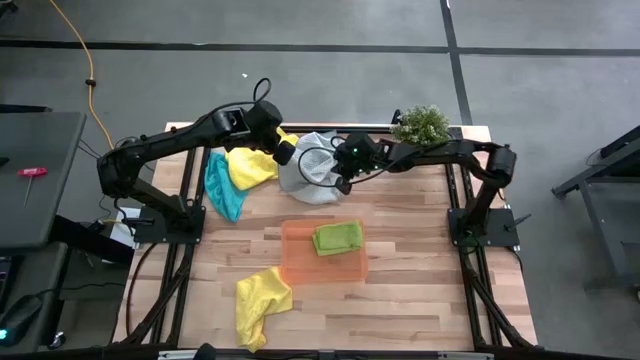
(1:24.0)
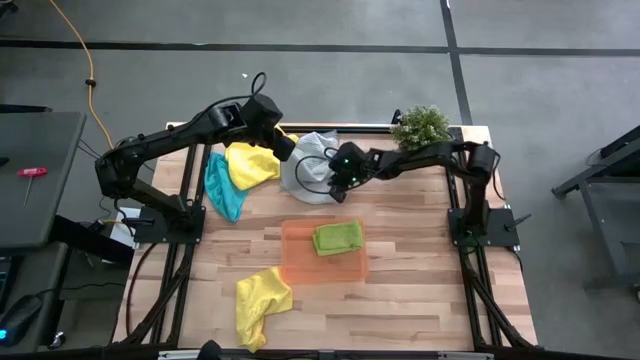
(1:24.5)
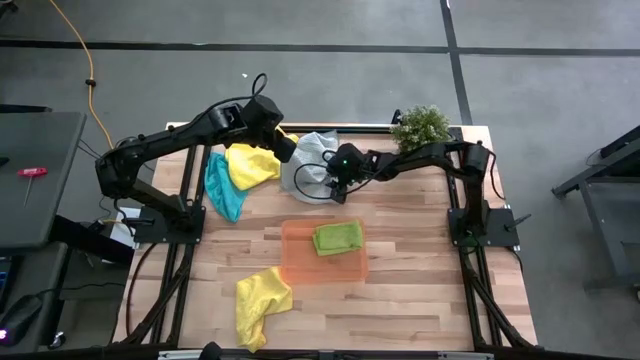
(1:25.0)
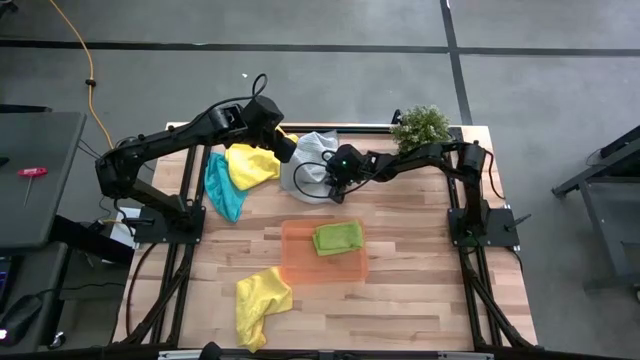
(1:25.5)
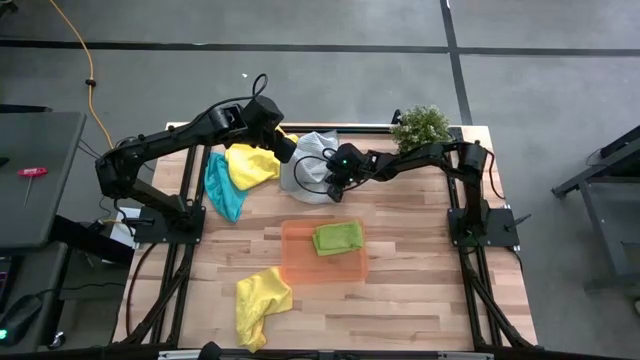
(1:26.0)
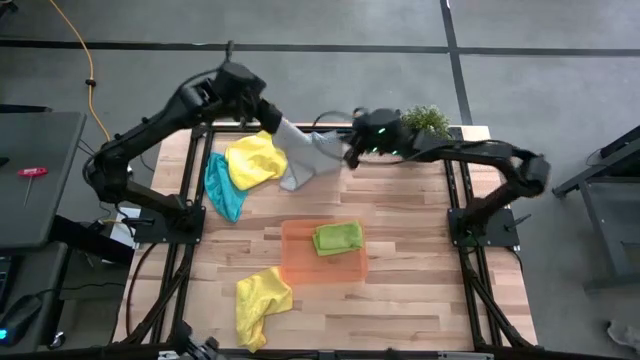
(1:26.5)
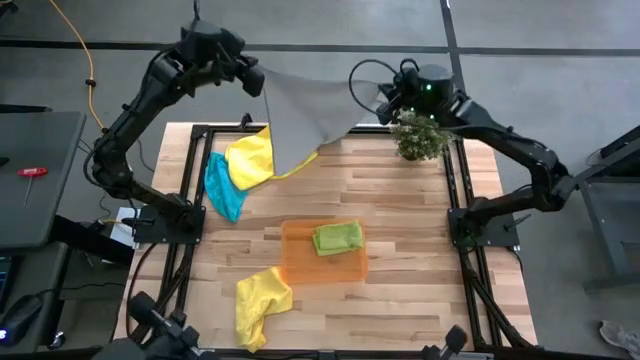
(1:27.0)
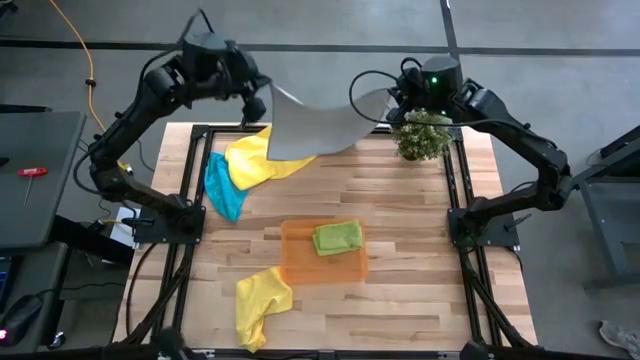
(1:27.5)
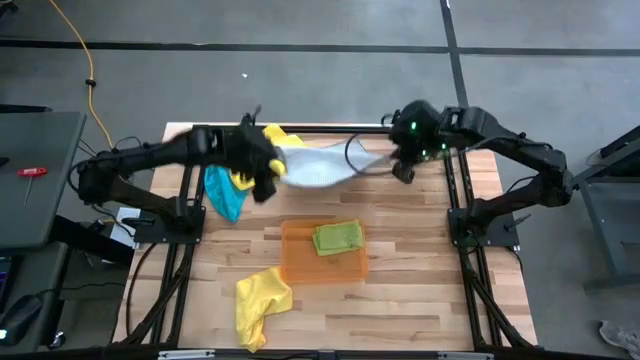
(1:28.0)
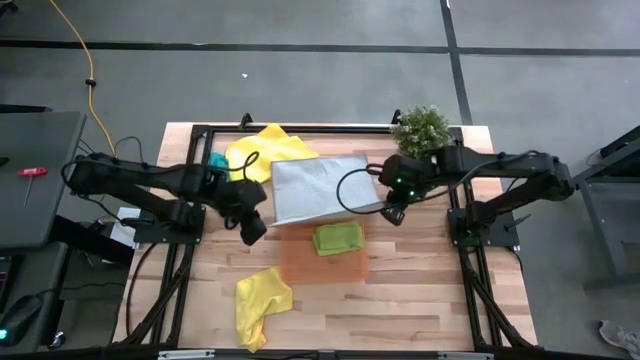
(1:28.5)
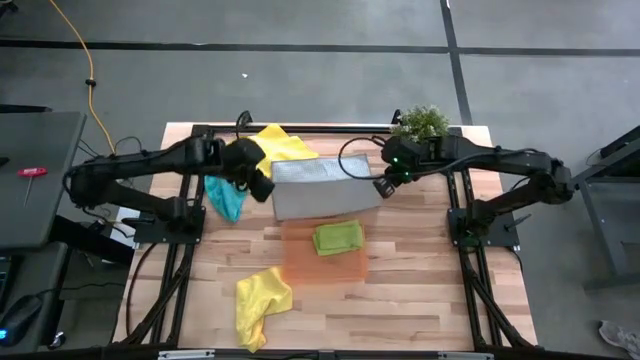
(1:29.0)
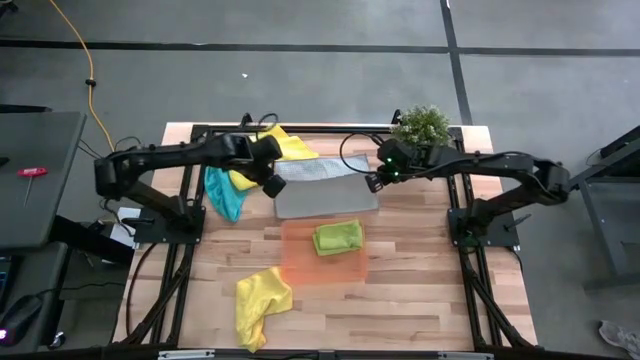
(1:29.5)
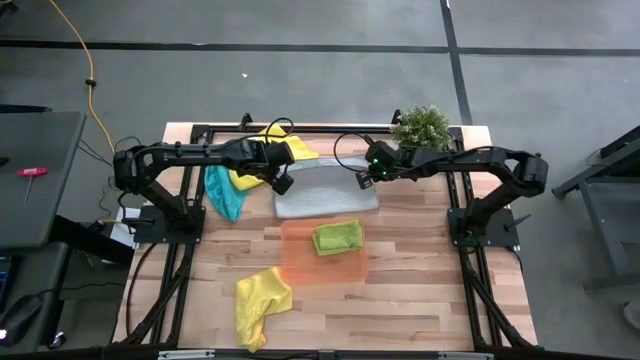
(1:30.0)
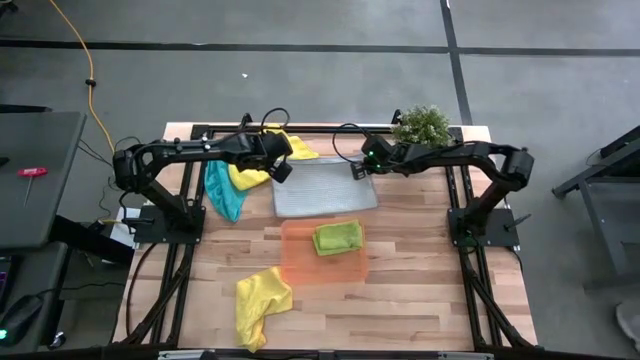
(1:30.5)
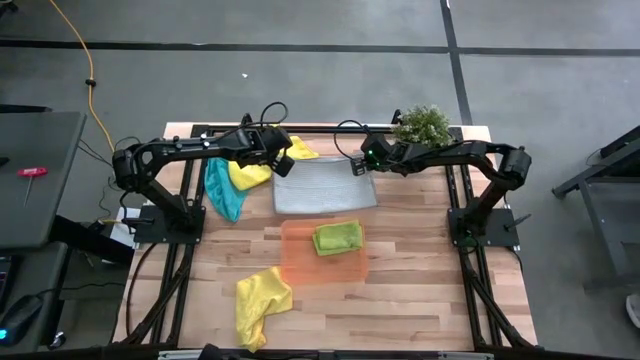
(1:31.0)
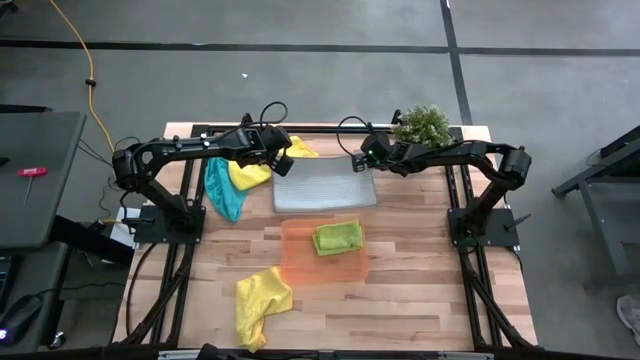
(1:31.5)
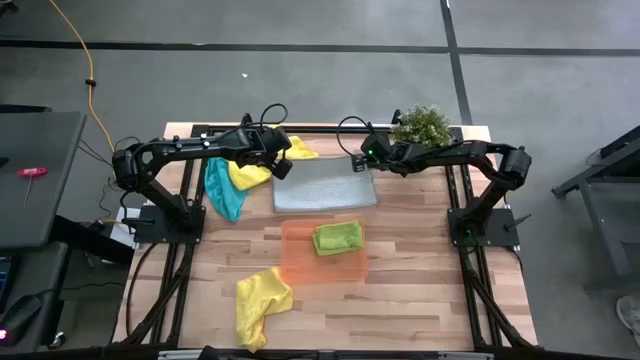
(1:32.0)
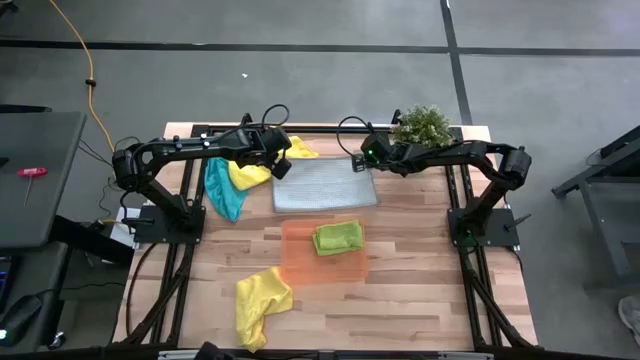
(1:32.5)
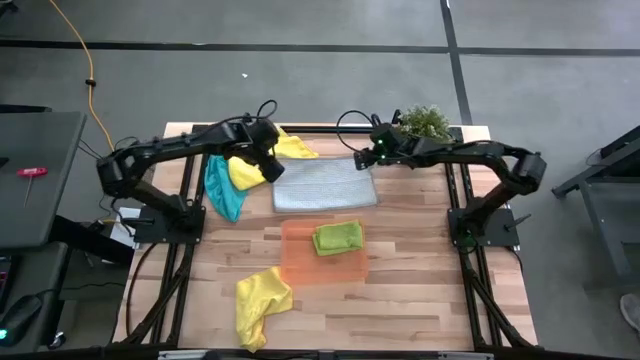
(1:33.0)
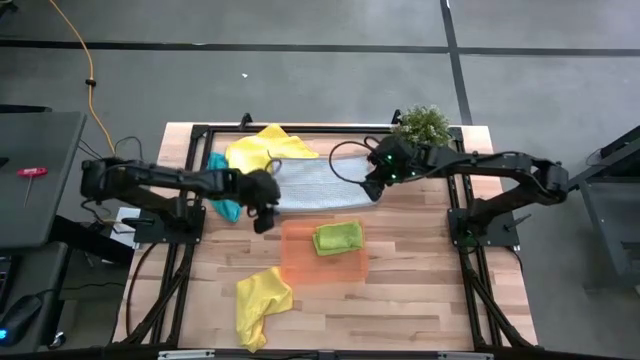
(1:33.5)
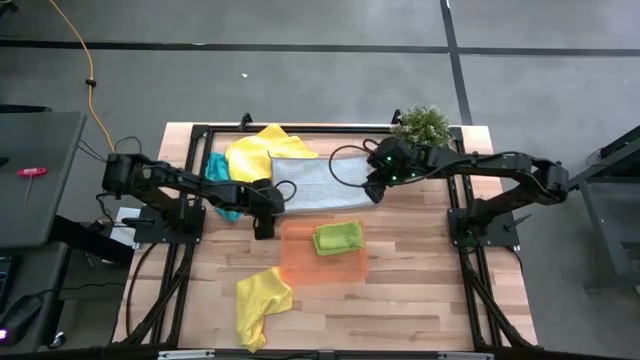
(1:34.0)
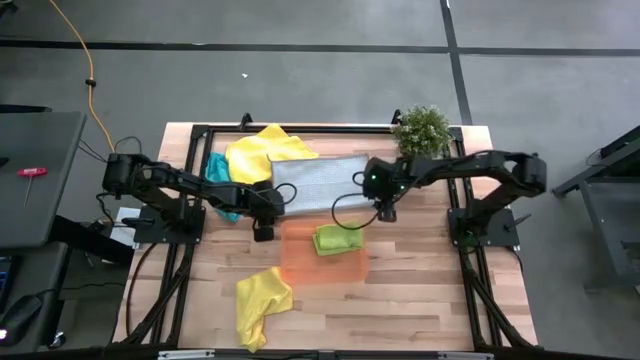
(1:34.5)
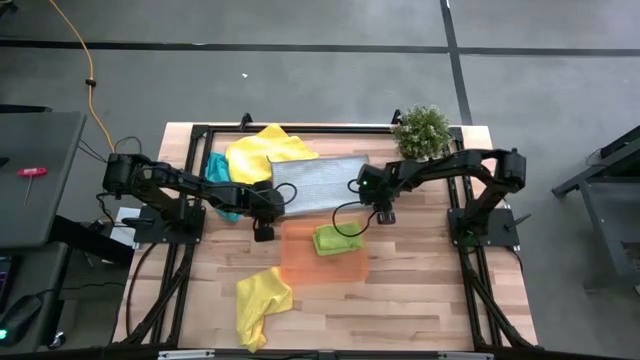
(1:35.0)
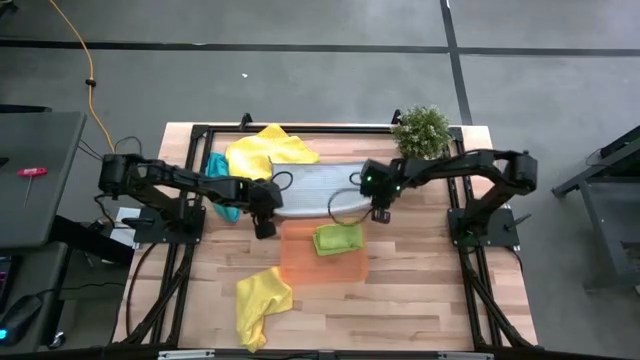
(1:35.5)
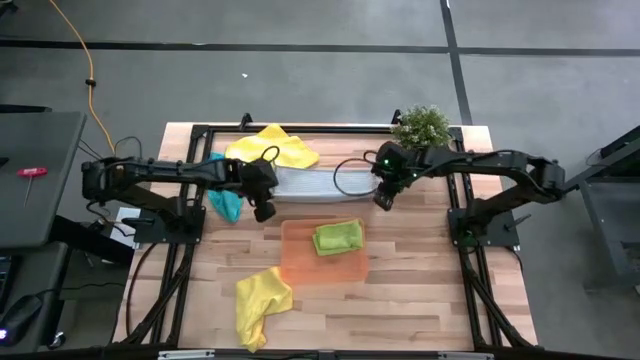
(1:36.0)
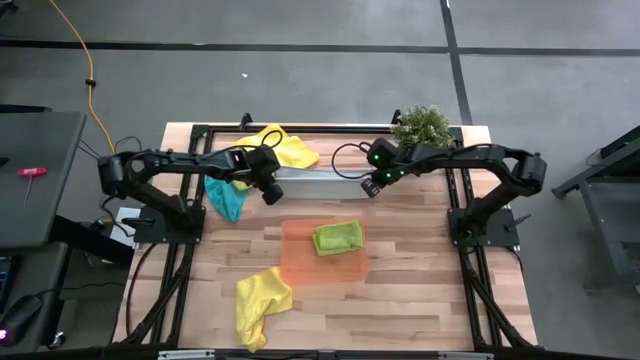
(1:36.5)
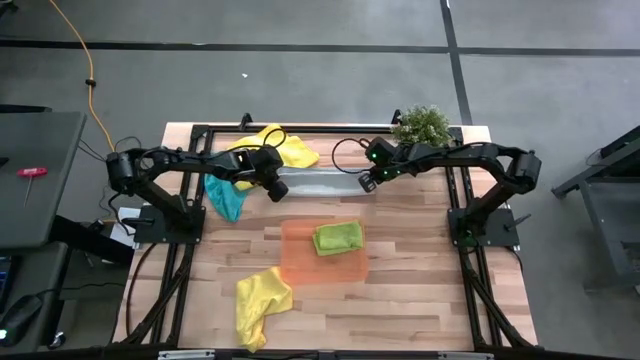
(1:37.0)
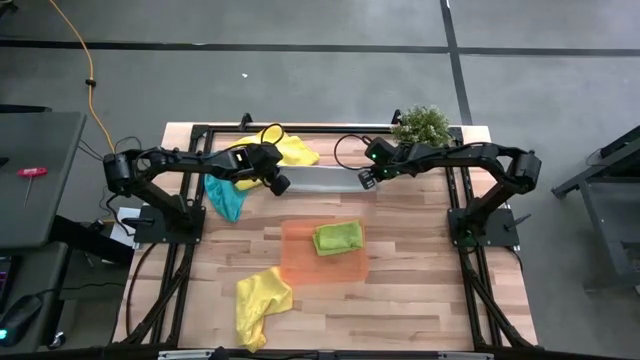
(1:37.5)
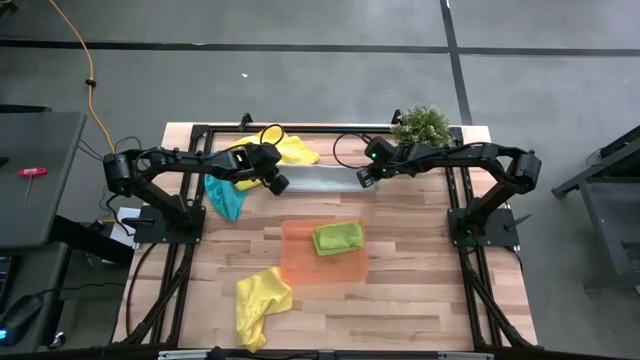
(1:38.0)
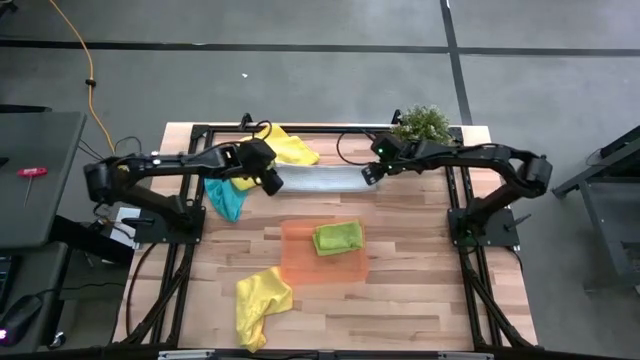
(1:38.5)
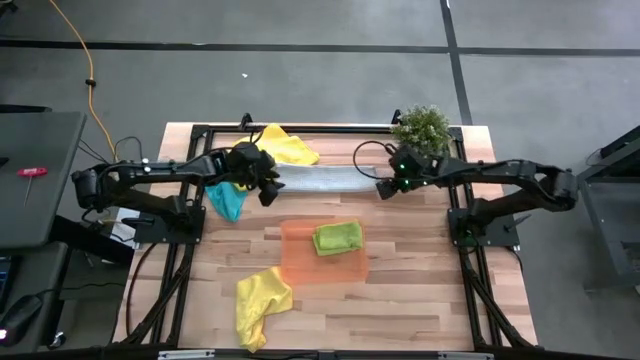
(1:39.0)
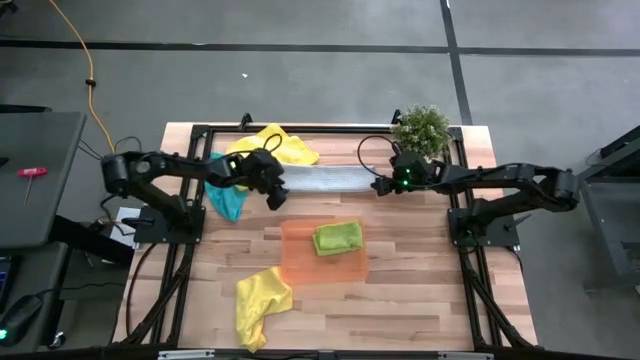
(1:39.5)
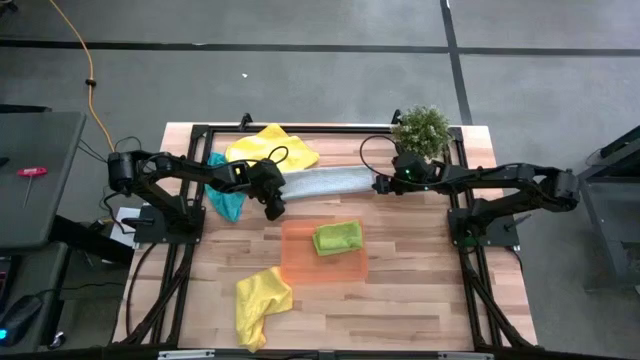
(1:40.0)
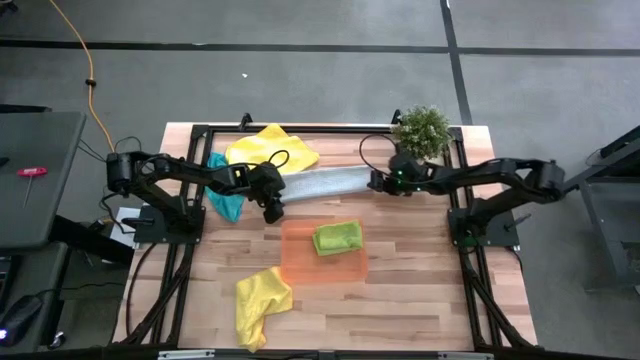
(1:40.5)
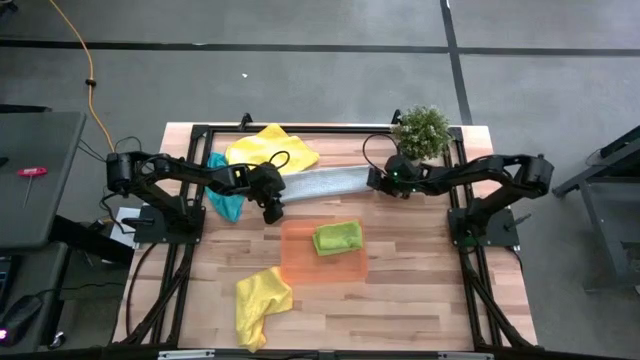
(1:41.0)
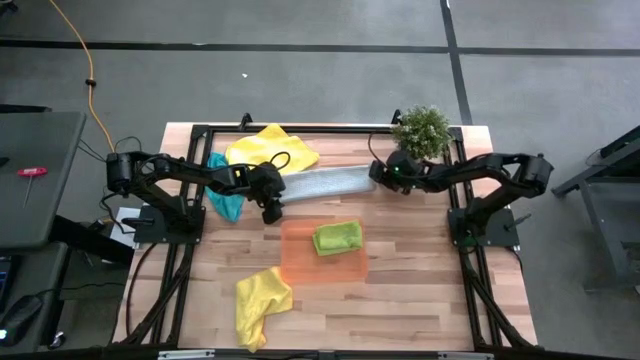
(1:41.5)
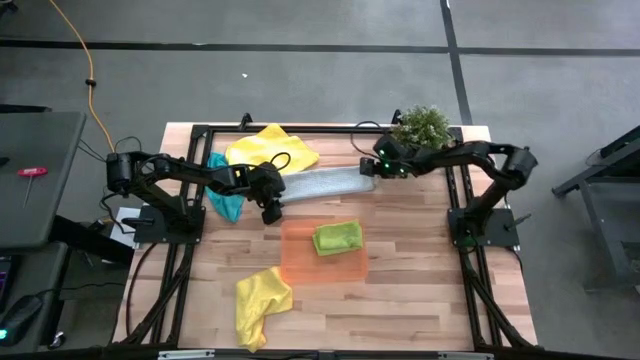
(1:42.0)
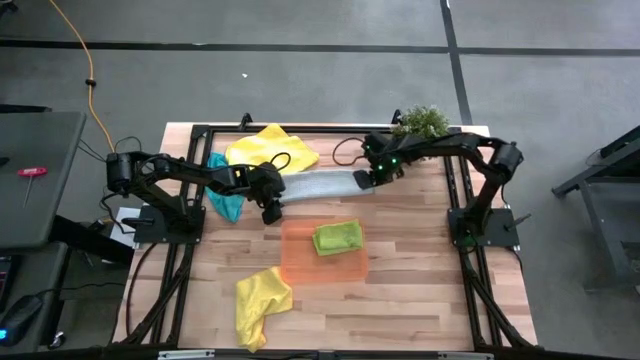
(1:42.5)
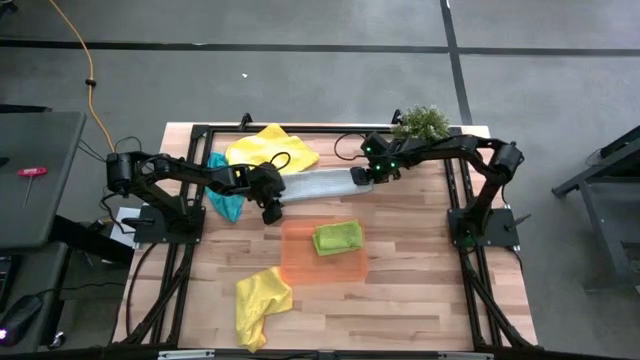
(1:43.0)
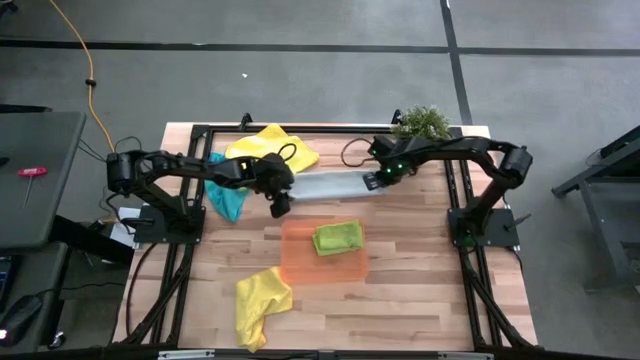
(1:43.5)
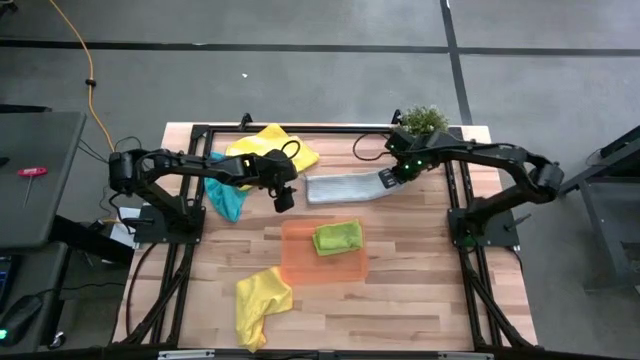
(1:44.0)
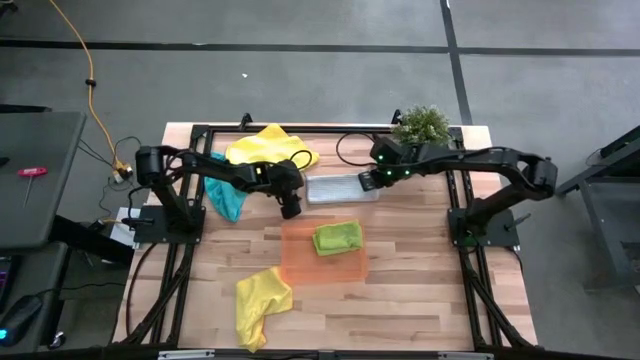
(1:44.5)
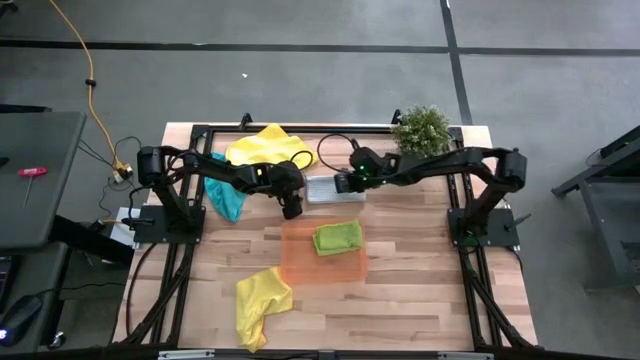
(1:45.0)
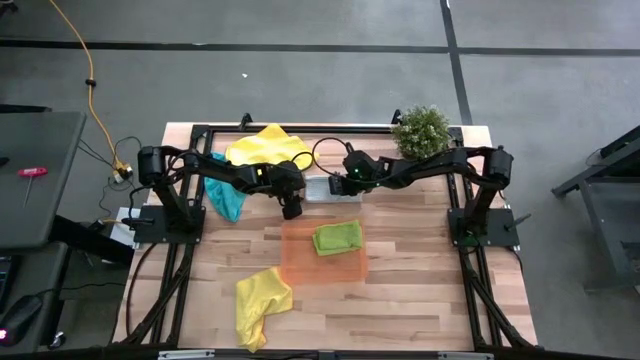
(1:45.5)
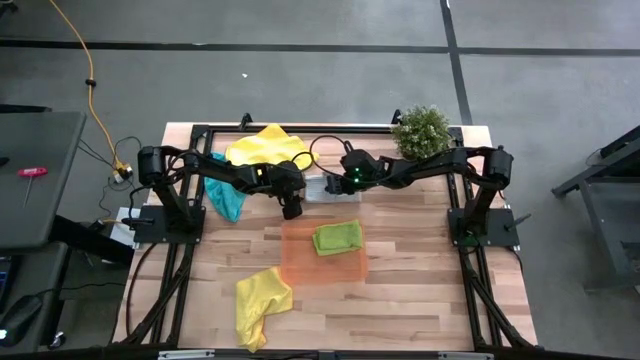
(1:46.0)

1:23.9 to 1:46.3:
Task: Fold microfiber towels
Fold the gray towel

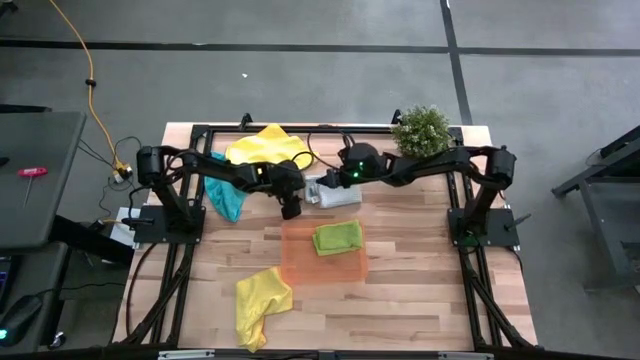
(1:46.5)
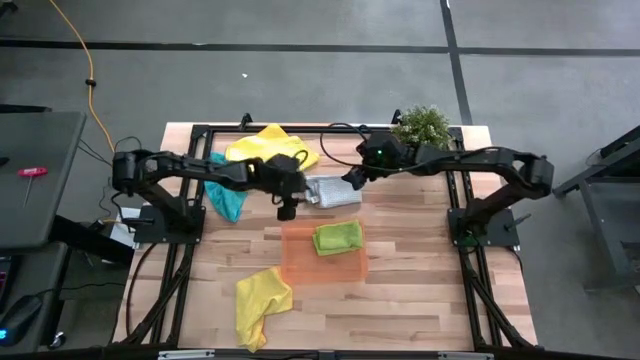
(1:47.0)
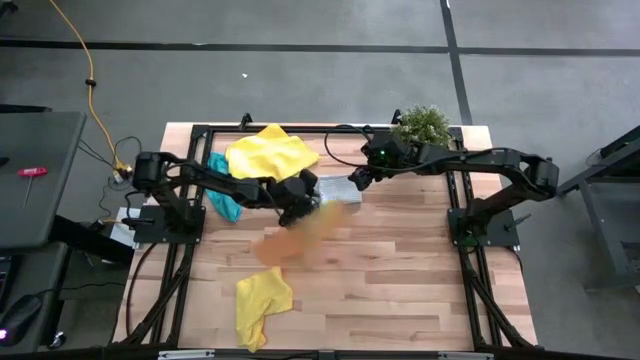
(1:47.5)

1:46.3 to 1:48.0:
Adjust the bin on the table
